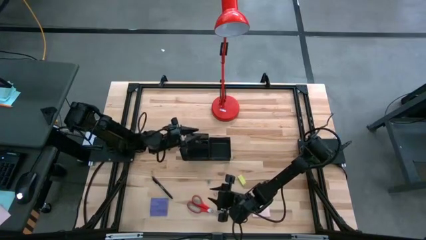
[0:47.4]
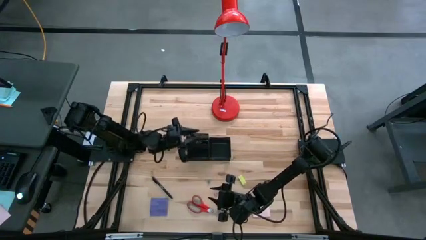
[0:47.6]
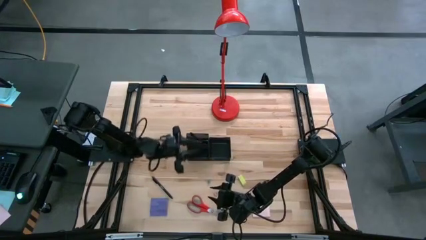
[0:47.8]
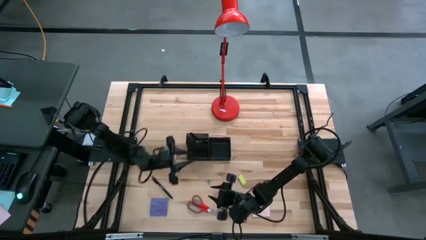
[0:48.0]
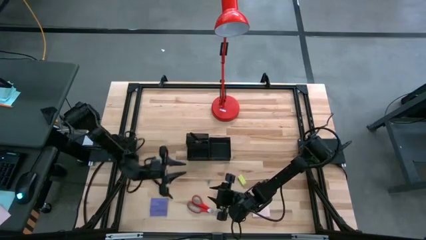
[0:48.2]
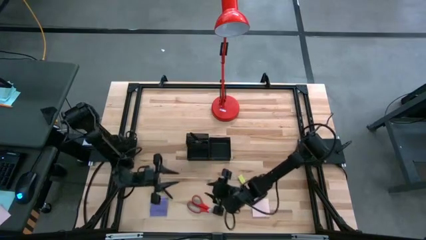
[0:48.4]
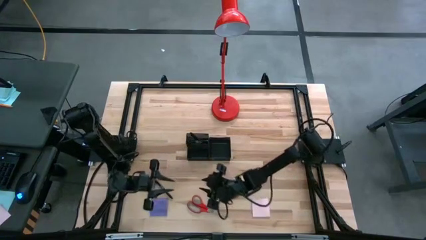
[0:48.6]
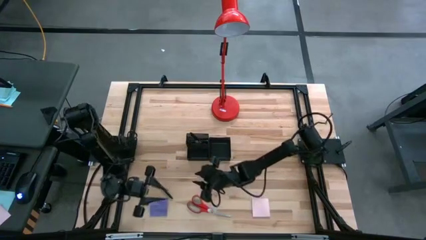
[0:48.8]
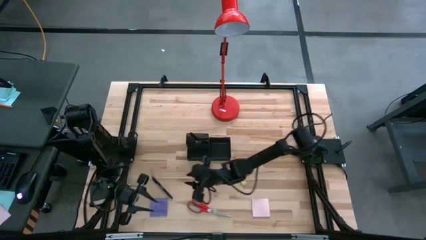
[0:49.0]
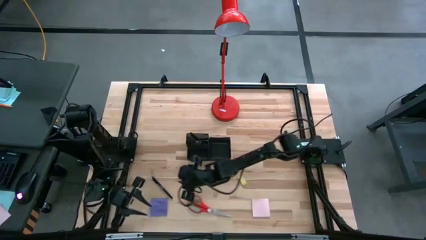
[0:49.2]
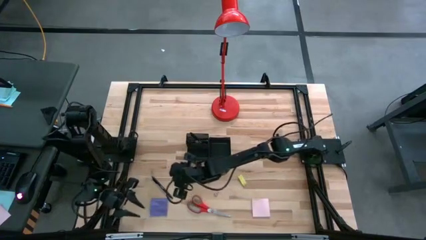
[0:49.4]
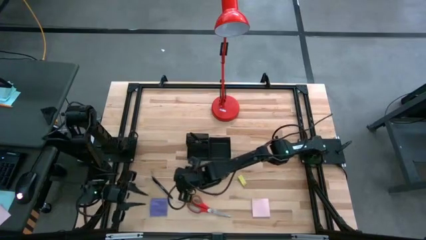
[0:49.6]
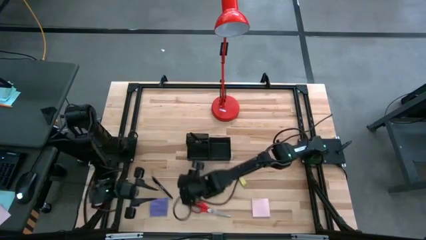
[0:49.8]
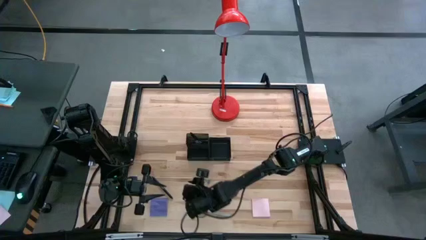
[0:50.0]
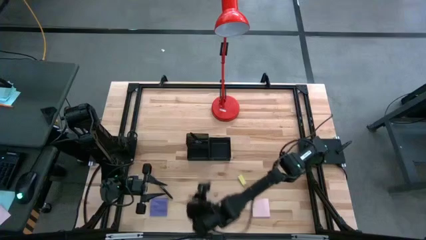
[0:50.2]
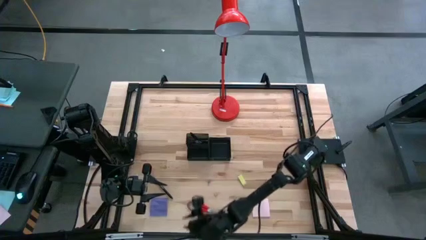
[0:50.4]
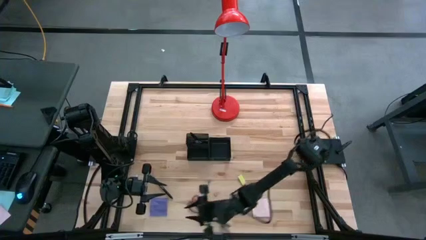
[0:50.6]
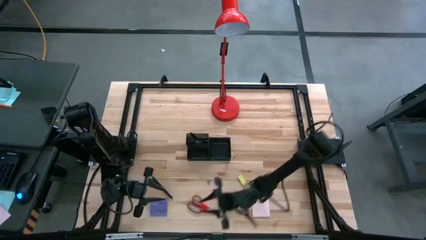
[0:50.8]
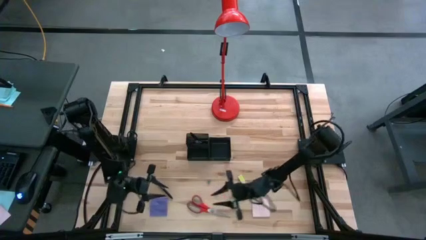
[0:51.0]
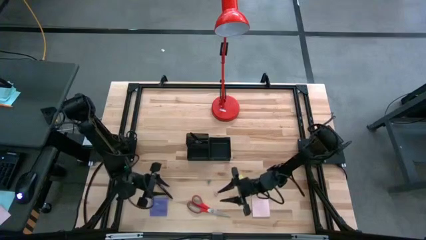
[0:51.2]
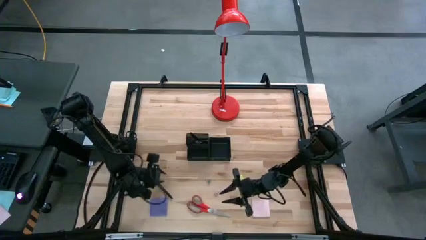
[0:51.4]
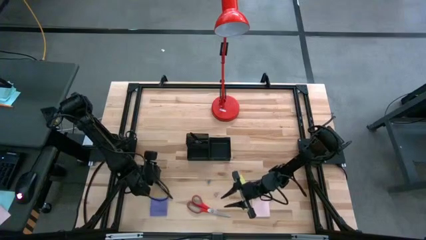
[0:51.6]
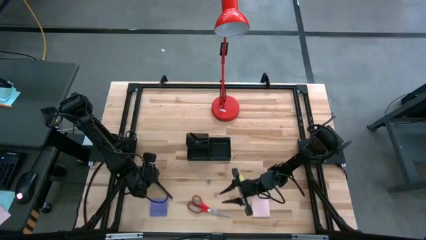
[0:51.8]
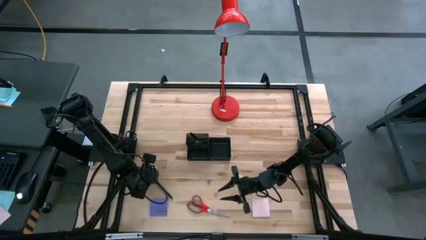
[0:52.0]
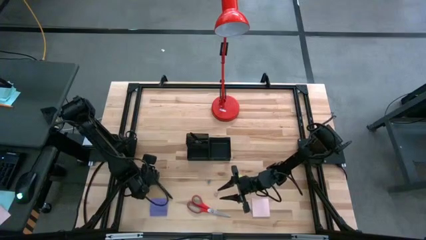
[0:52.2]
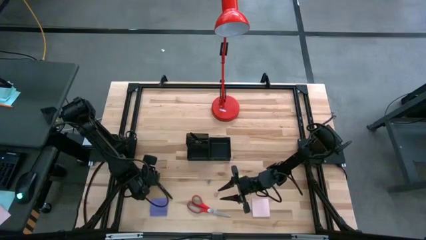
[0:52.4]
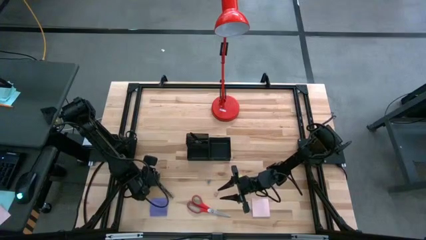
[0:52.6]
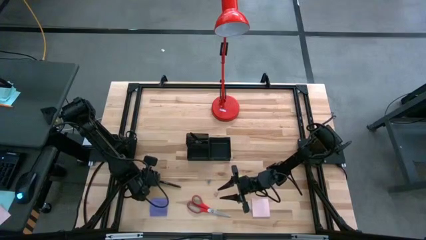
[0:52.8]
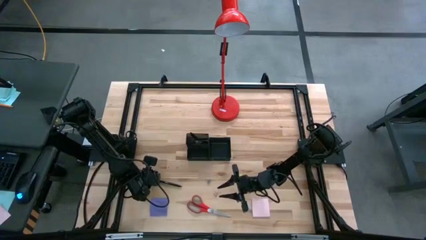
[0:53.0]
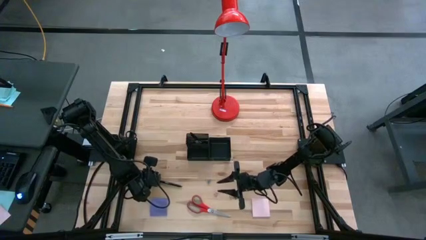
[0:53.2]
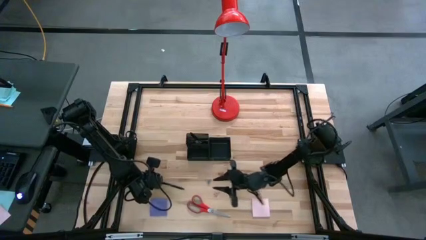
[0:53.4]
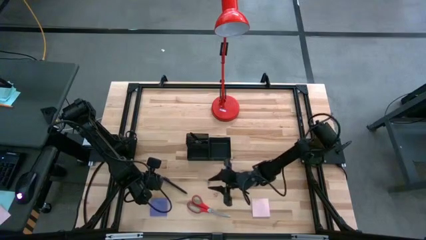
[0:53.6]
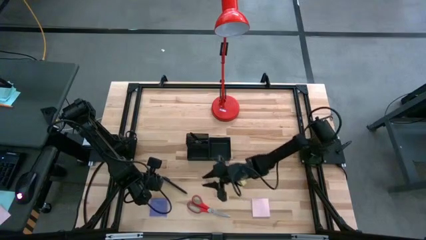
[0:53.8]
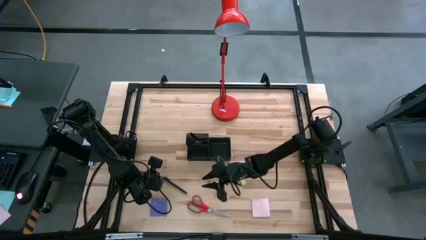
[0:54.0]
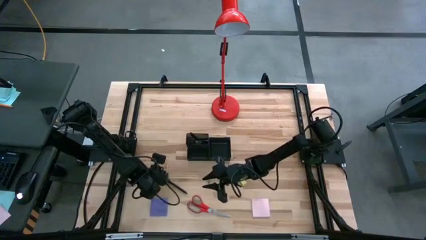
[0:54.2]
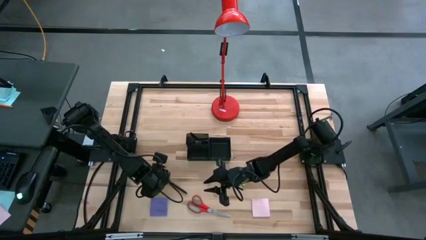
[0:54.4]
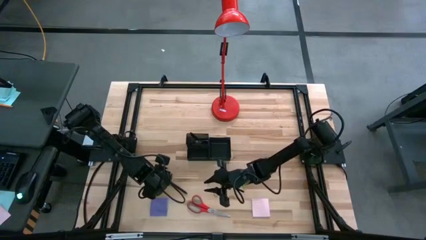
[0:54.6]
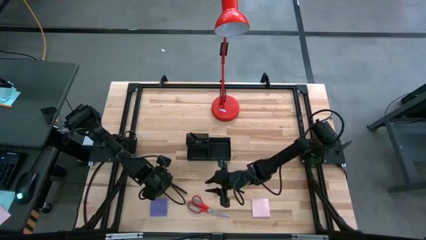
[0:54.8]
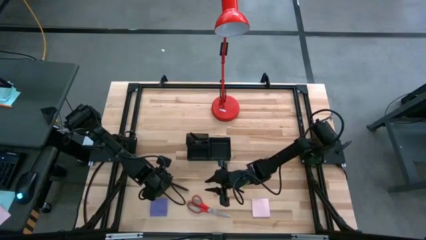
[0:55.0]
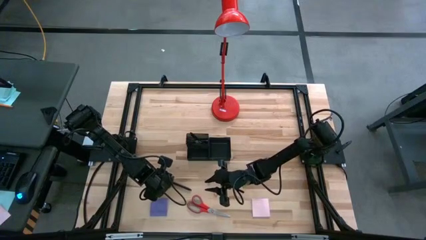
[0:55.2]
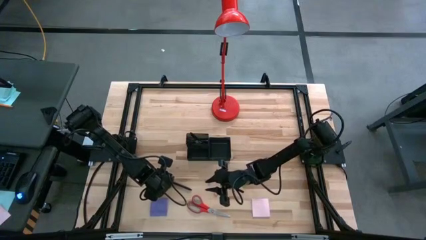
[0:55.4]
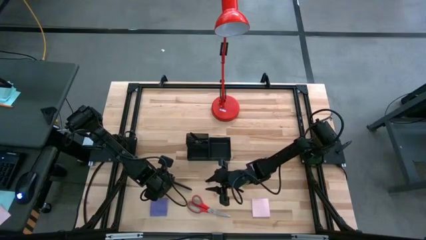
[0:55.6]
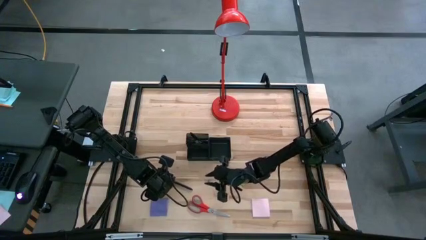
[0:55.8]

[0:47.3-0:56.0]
Task: Pick and place office supplies into organizer
Put the black pen into the desk organizer

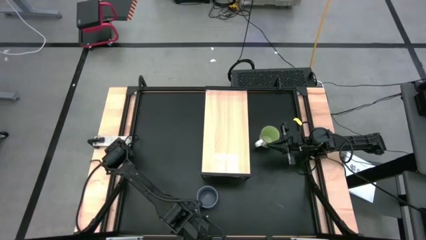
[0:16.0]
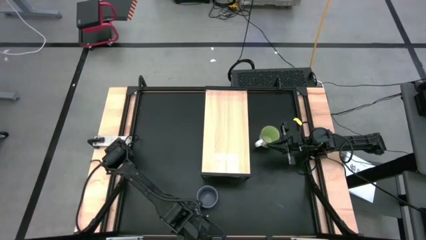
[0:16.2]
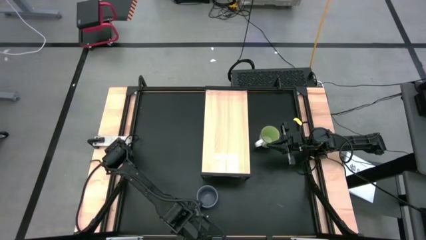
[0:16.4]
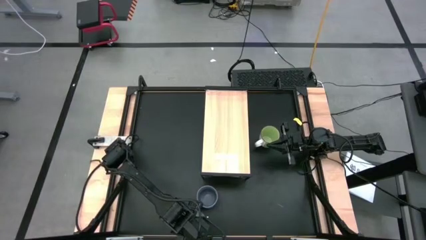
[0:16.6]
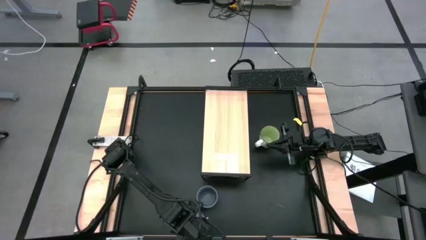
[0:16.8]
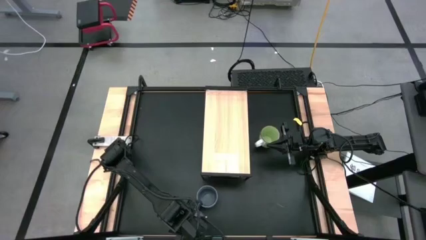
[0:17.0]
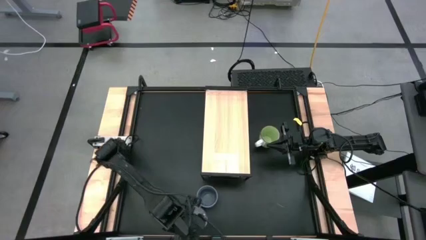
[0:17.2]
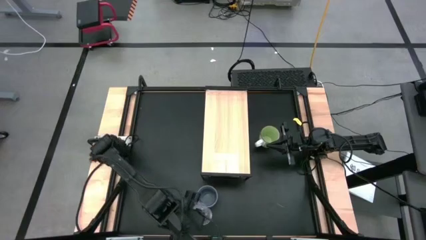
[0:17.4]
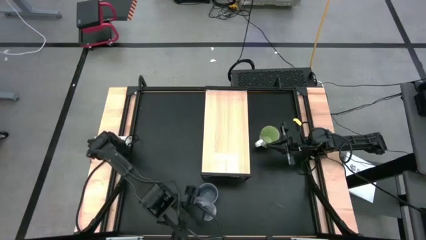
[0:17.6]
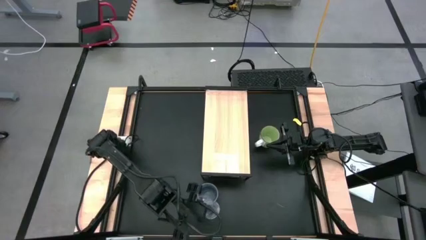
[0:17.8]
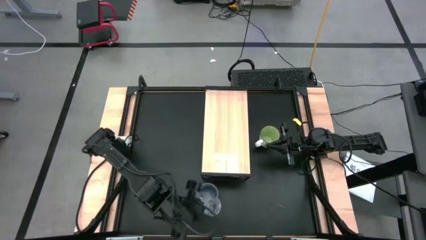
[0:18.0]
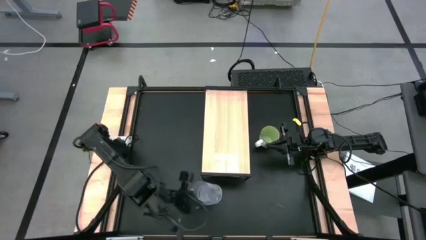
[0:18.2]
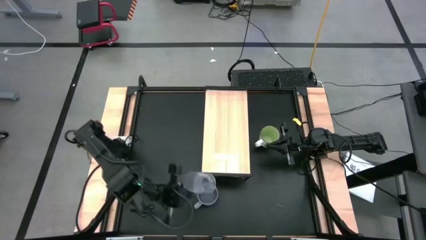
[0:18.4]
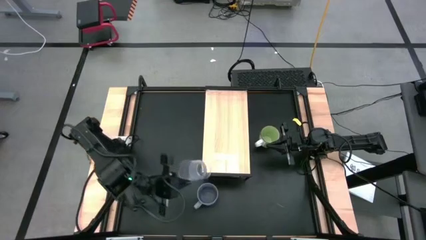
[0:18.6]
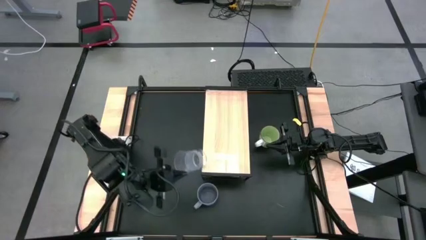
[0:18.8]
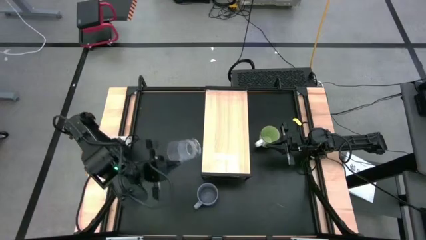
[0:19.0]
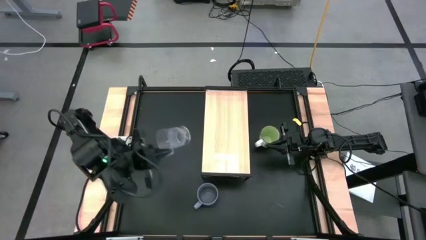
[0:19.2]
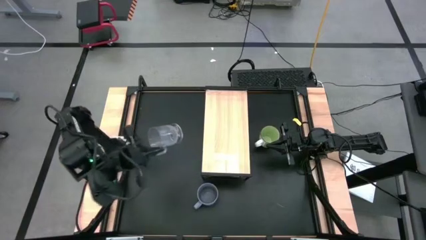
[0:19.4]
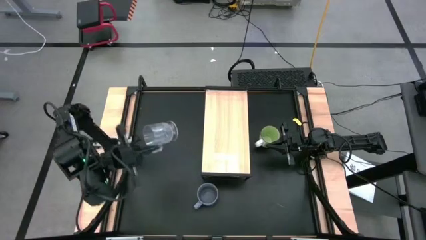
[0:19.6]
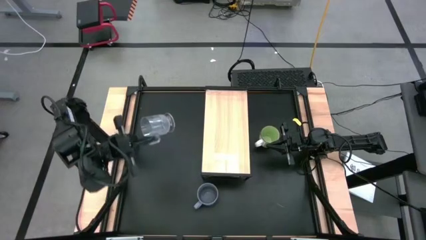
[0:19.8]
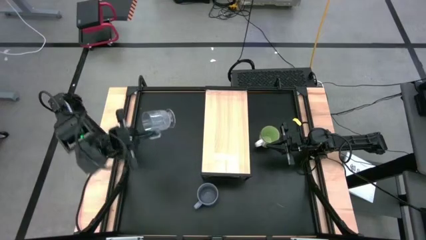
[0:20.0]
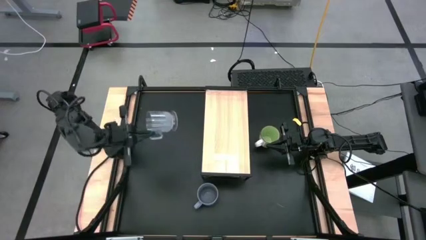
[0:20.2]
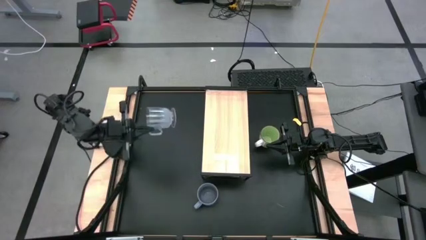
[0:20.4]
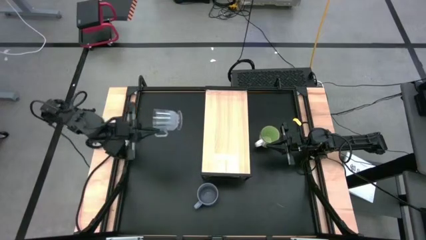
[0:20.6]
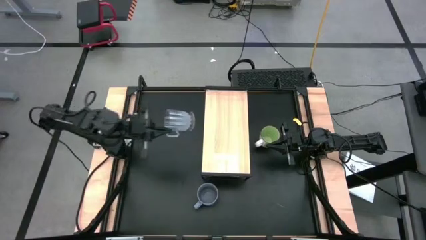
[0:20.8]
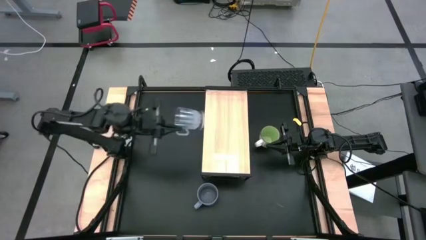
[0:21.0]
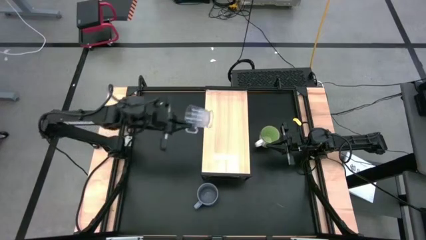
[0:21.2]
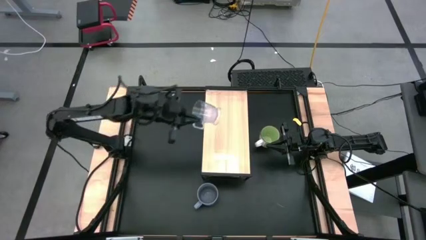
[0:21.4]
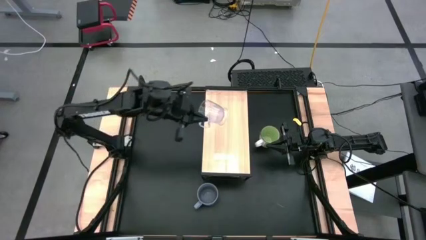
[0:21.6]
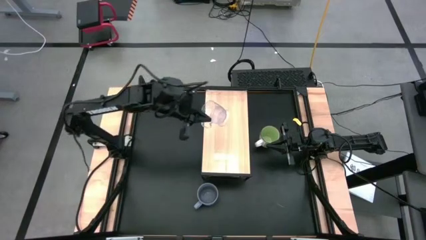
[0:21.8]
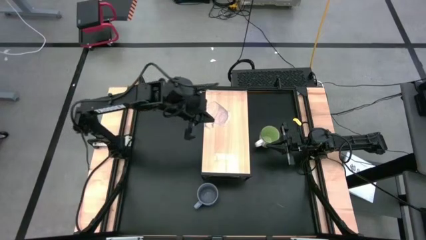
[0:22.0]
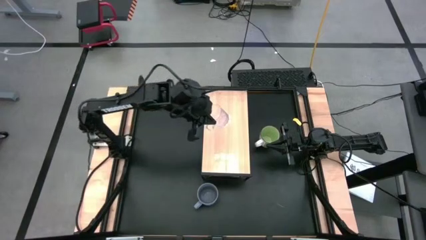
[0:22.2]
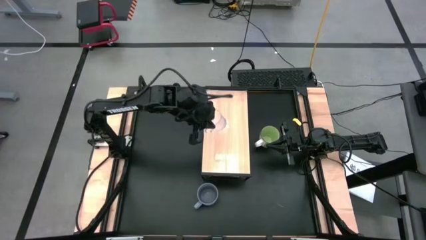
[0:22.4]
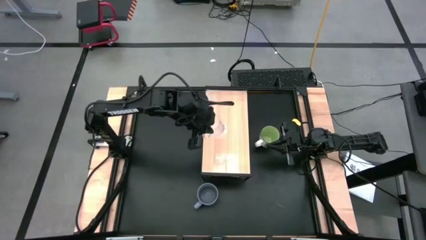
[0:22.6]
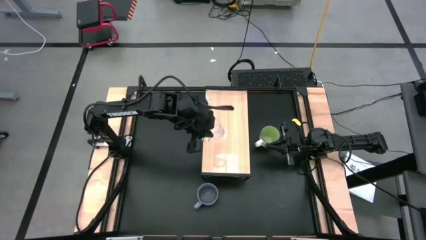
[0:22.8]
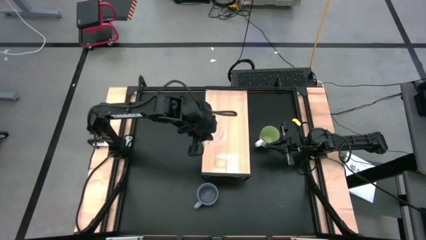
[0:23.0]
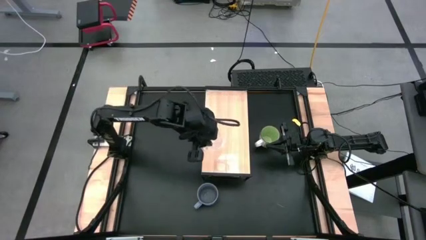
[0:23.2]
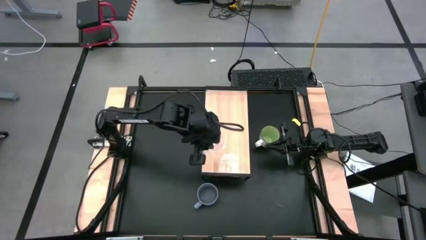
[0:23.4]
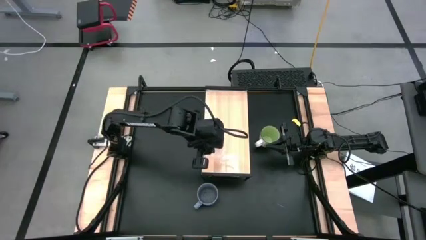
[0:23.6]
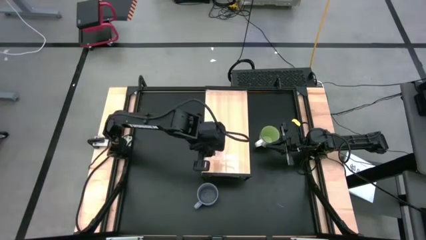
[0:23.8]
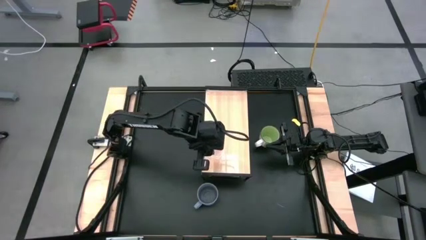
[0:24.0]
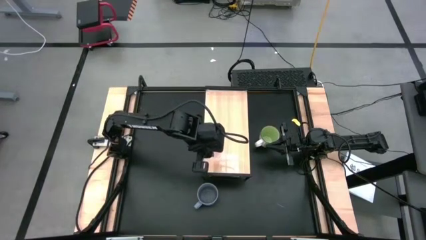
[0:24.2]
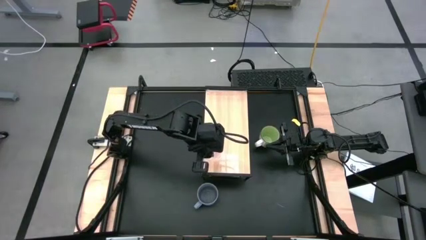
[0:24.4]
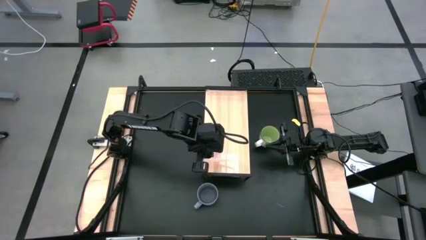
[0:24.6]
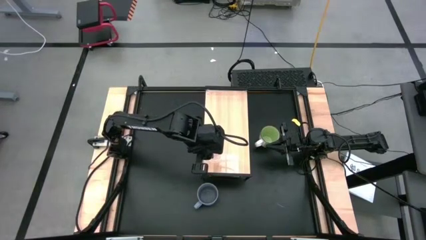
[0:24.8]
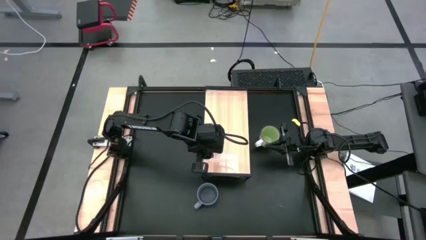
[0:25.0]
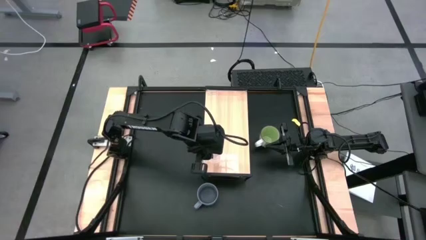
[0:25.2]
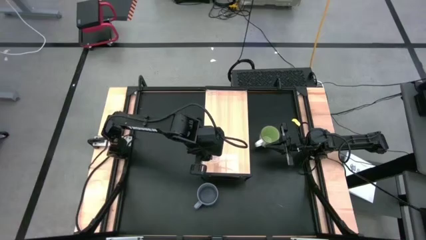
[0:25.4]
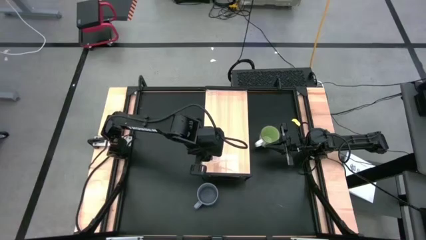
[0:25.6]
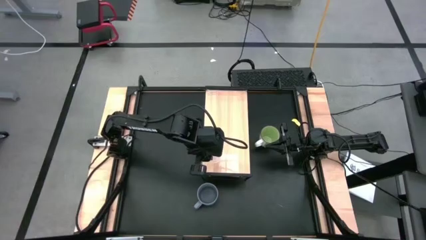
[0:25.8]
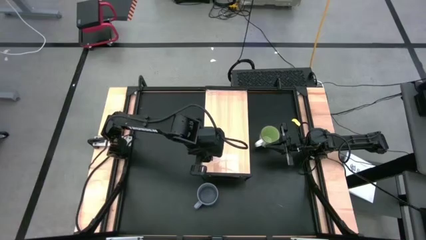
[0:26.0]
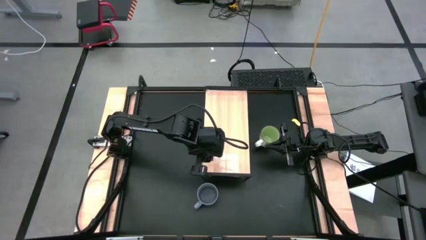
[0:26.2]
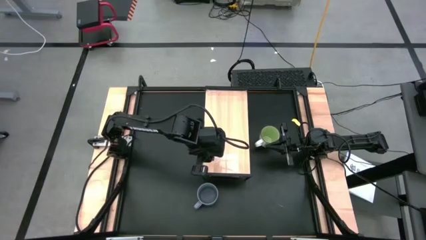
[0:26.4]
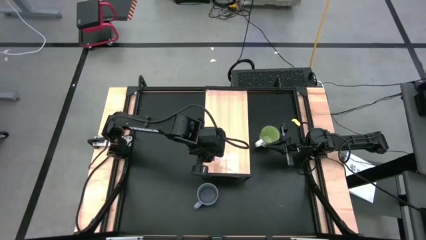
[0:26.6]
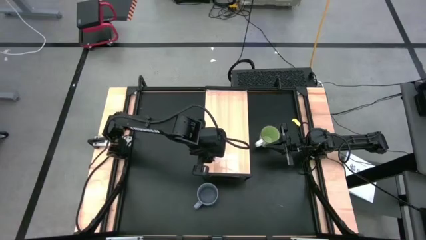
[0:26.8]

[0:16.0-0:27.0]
Task: Stack small to large cups/mugs on shelf
Put the transparent mug on the shelf
